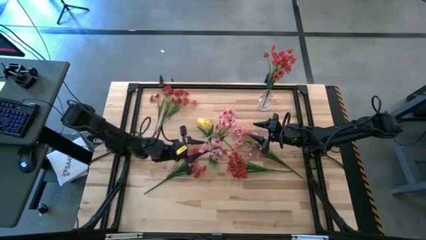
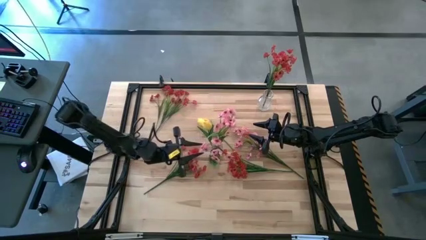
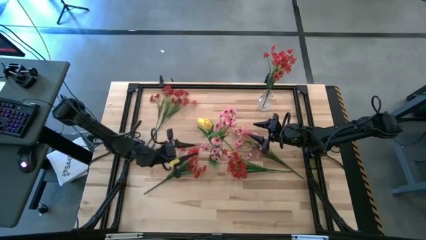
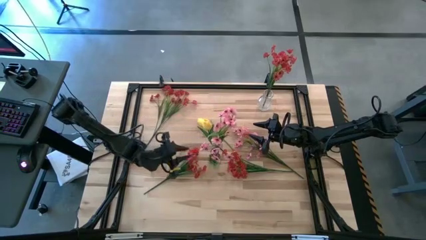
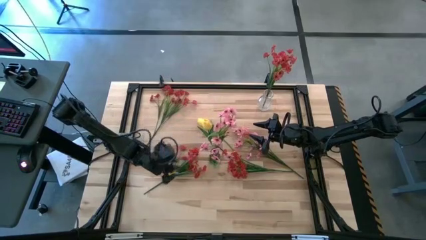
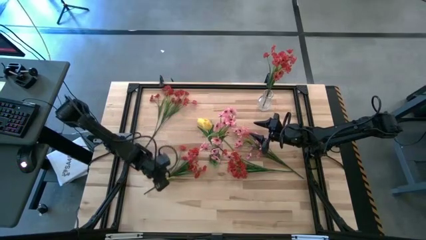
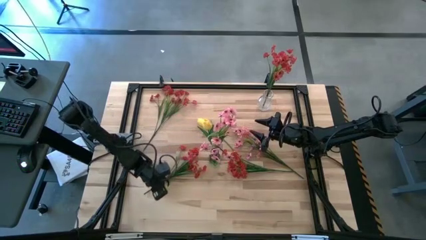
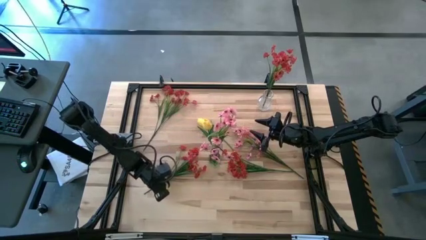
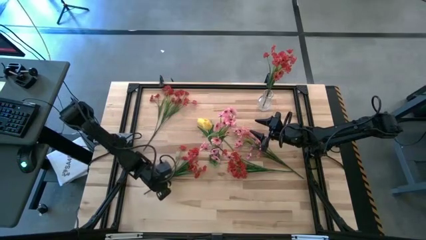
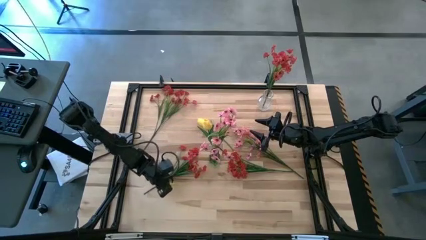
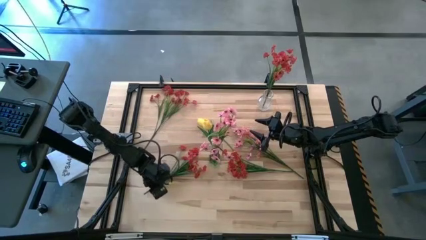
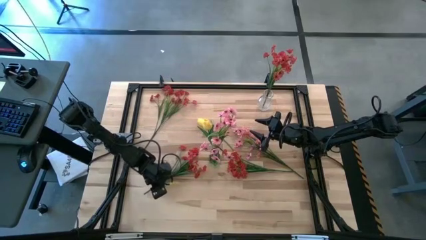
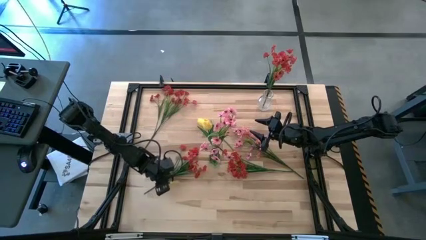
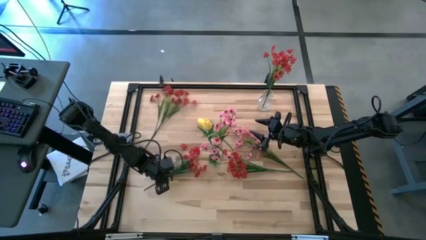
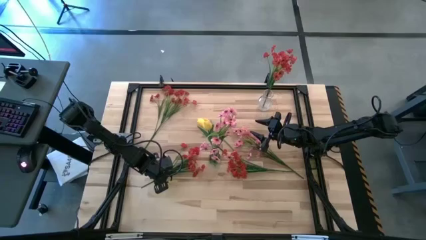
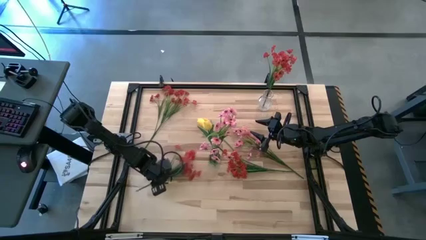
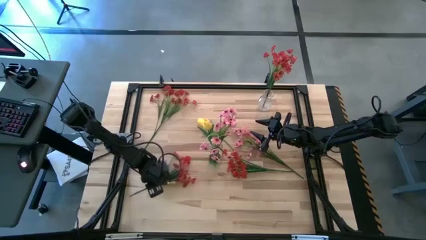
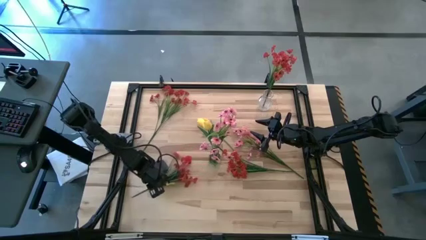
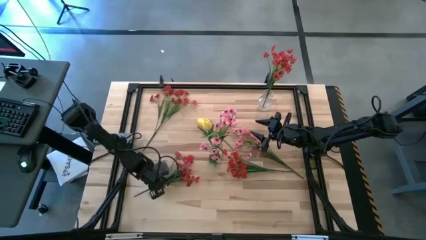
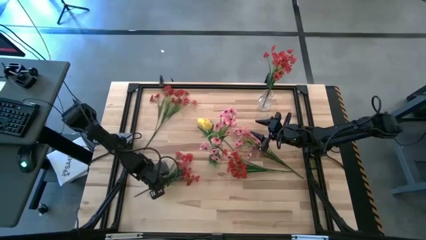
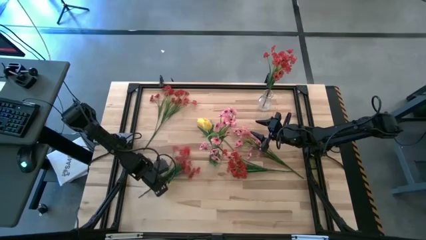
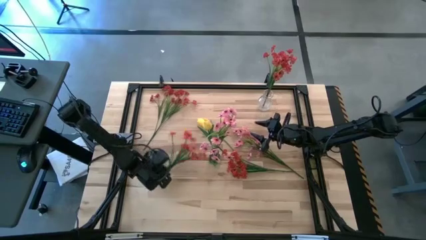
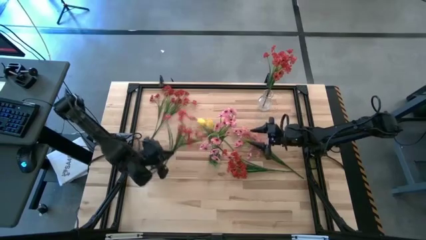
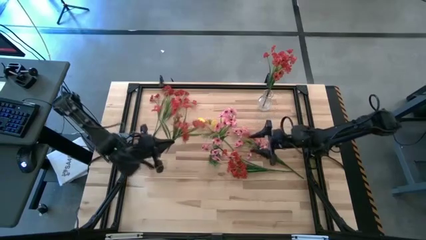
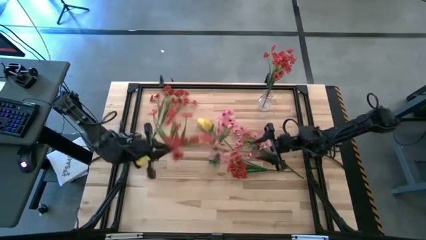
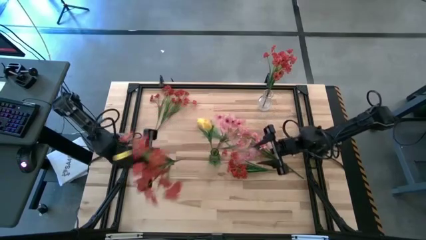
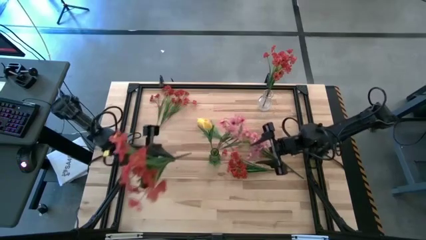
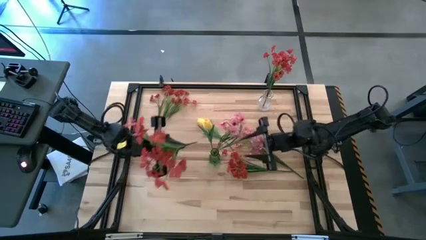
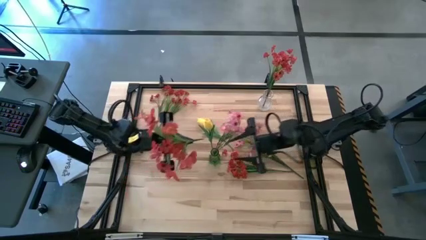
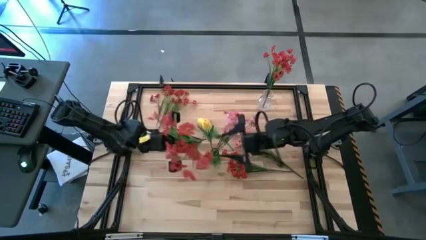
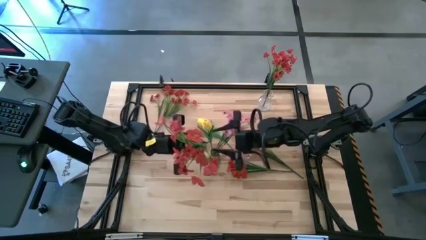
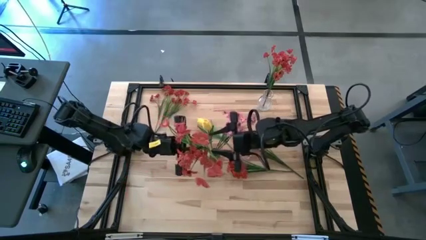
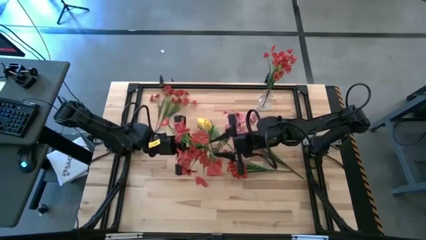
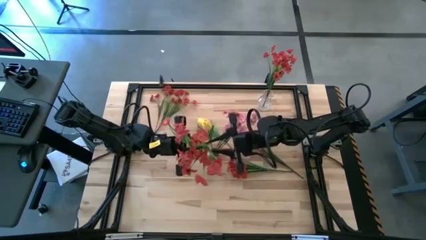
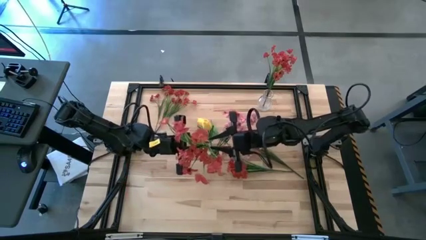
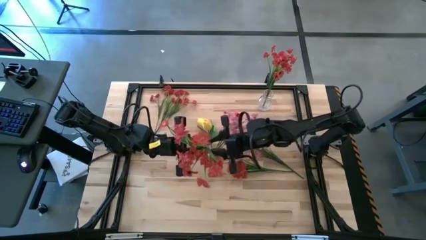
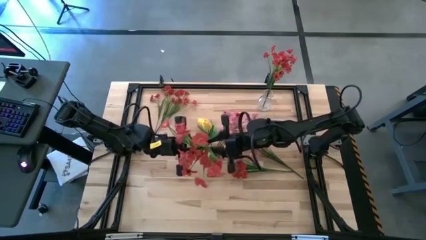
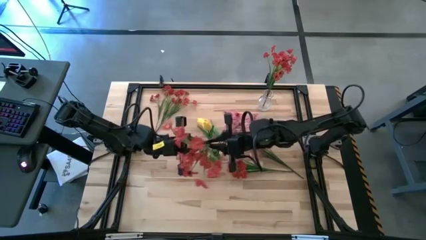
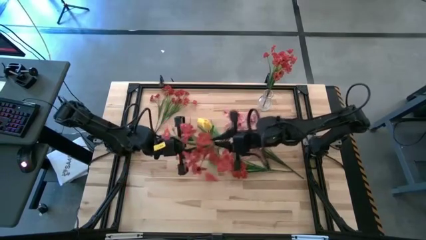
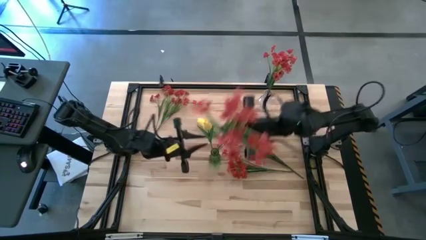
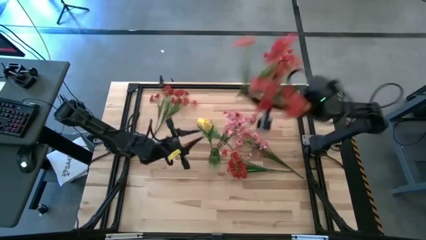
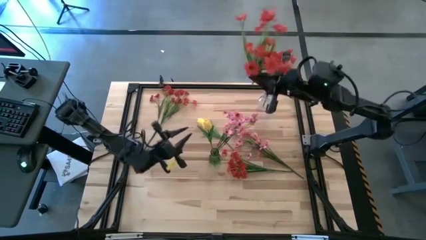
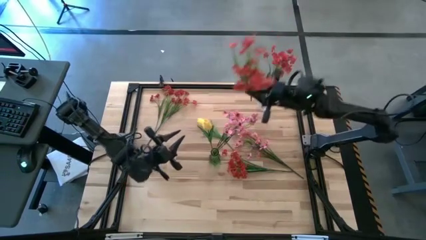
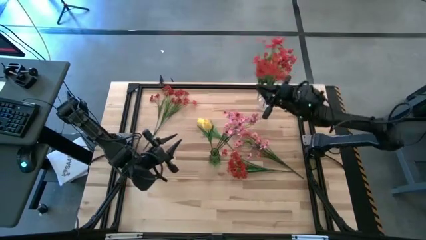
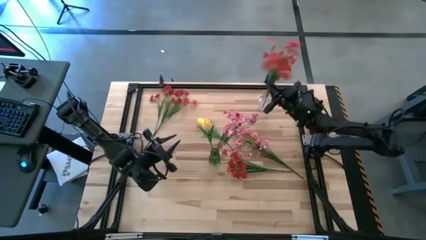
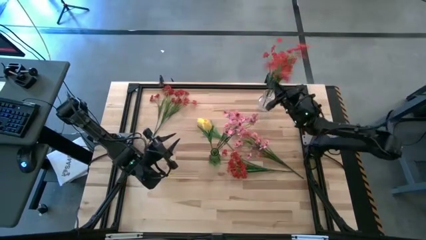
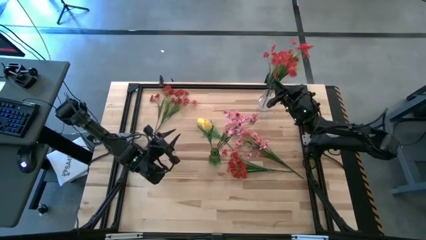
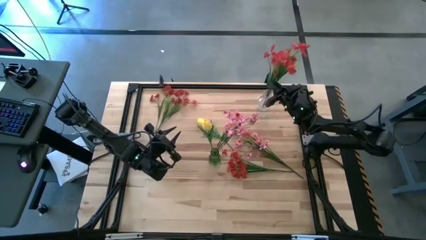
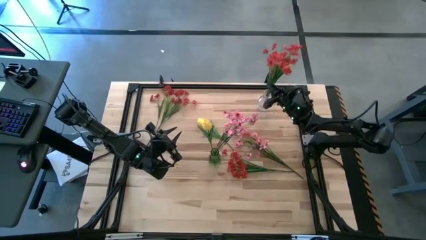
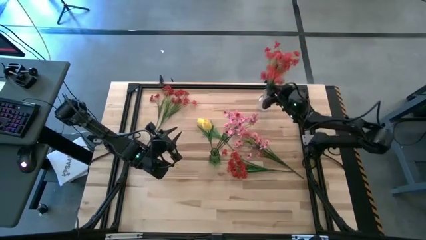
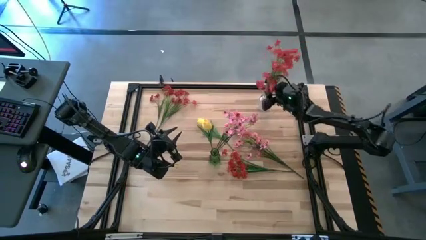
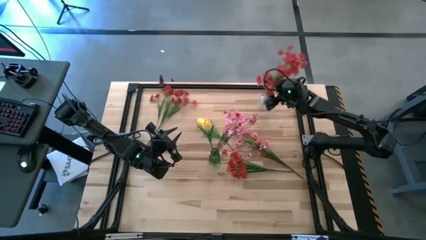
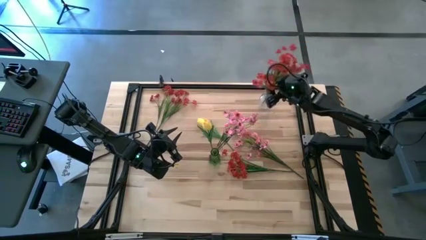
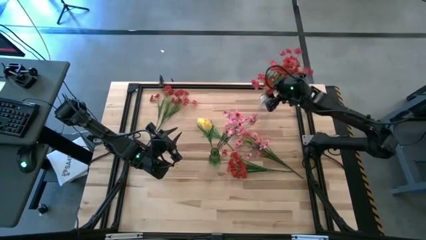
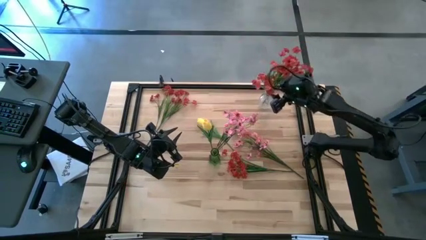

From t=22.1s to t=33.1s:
Task: Sort flowers into vase by color
Put the bottom left red flowers into the transparent vase

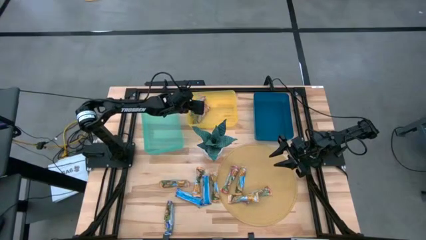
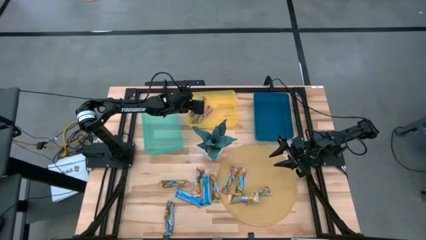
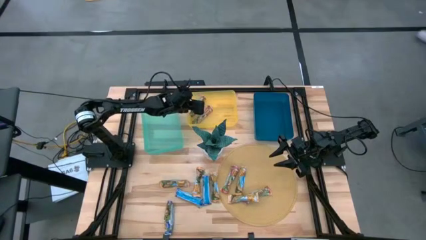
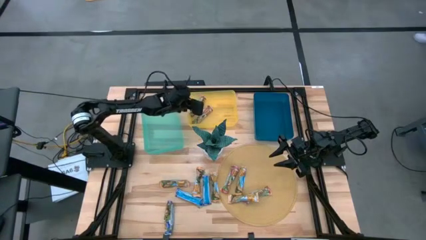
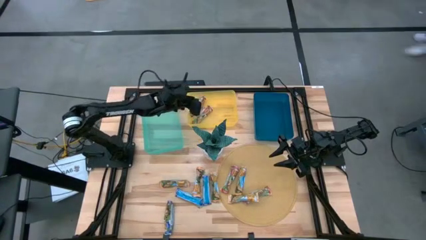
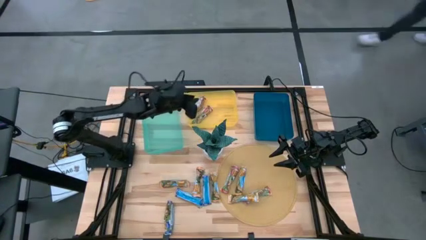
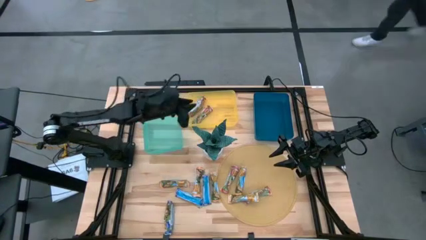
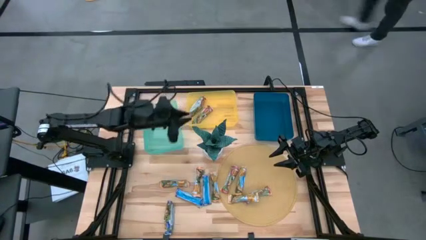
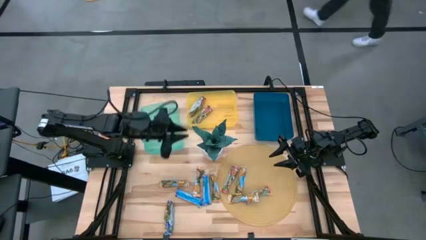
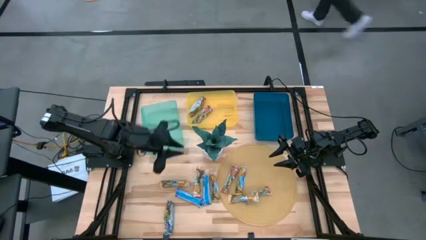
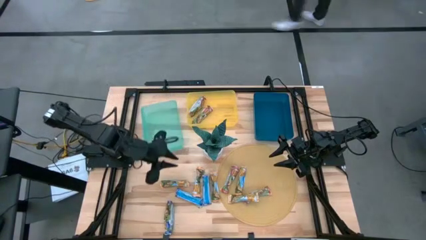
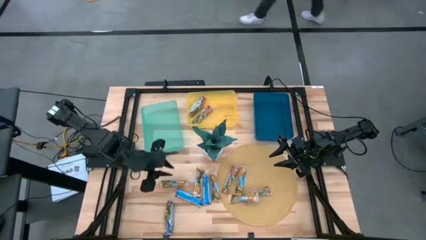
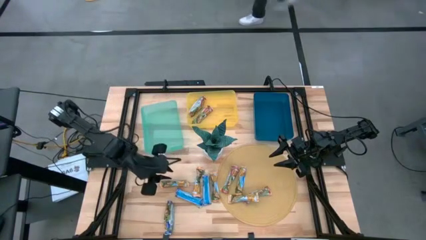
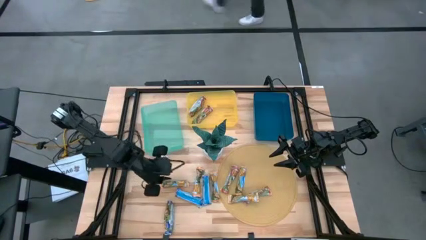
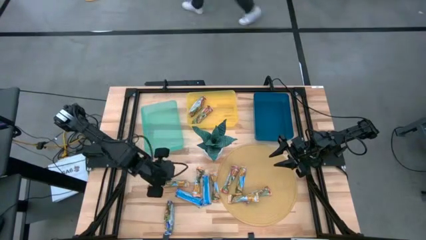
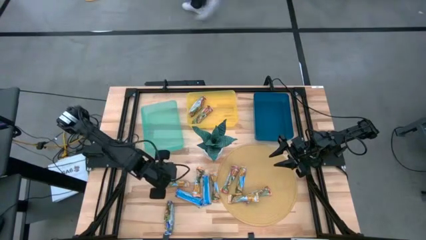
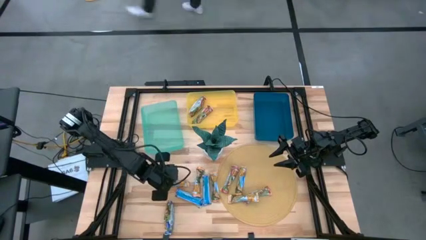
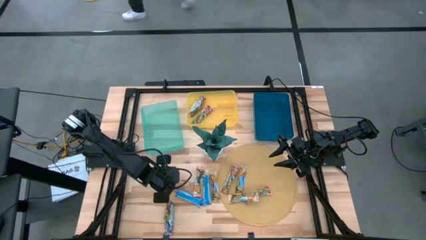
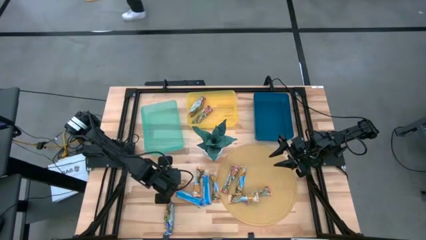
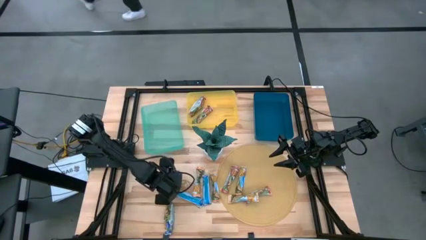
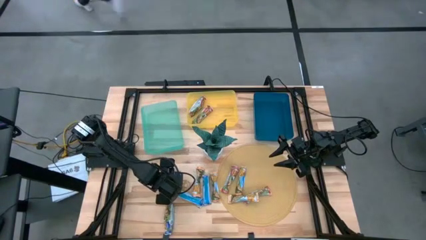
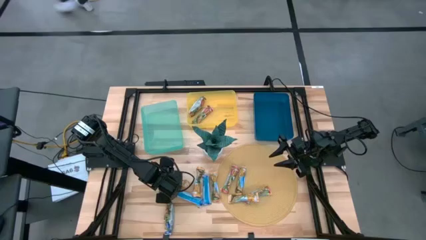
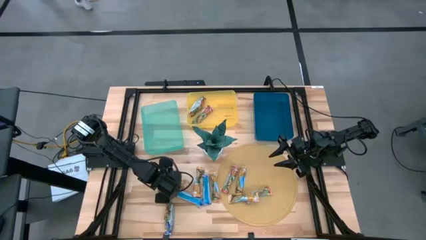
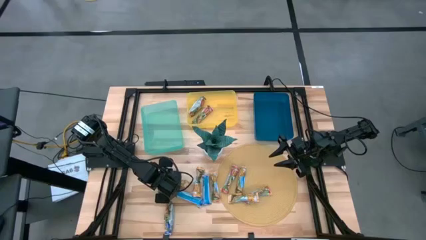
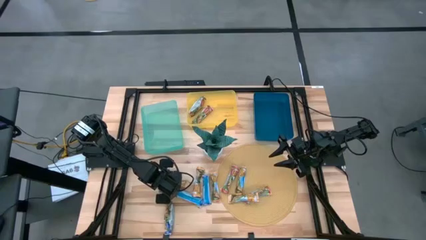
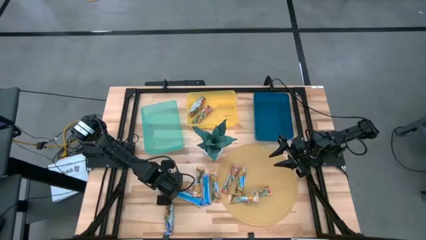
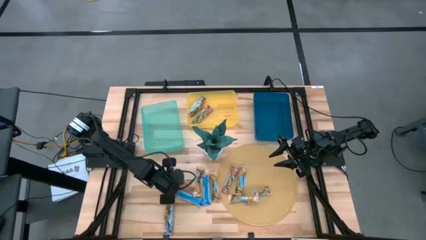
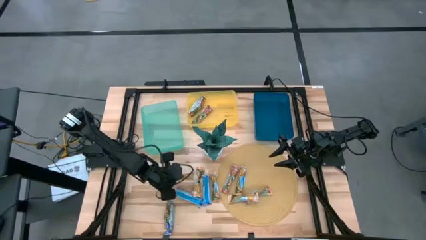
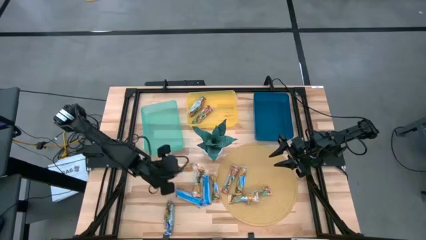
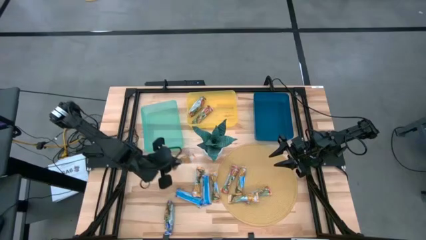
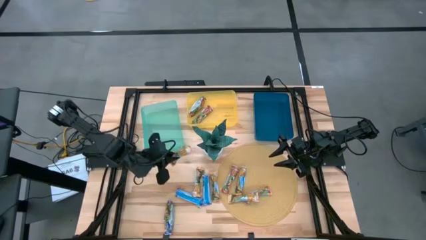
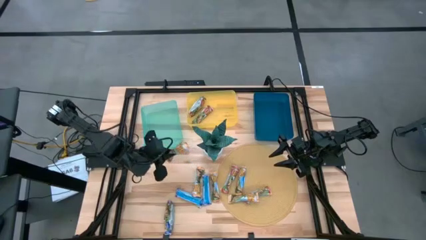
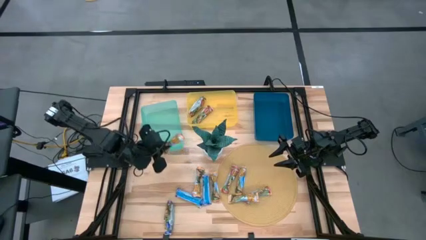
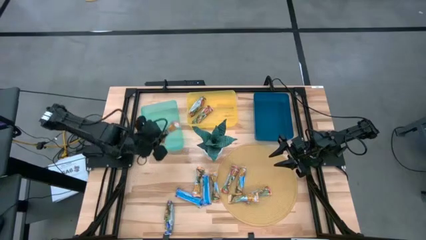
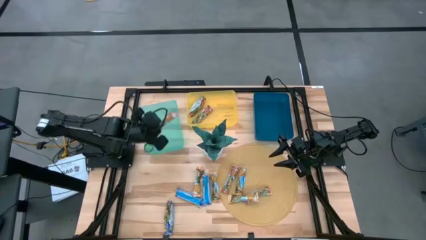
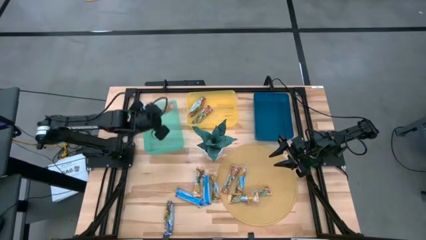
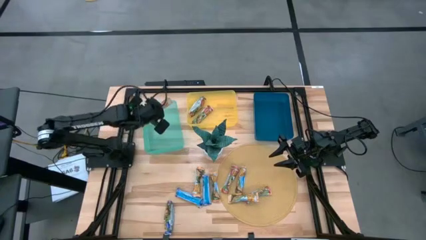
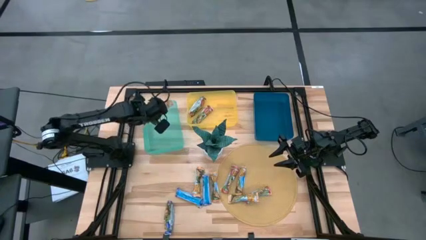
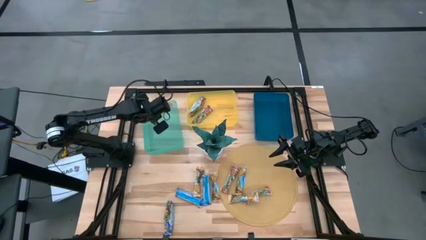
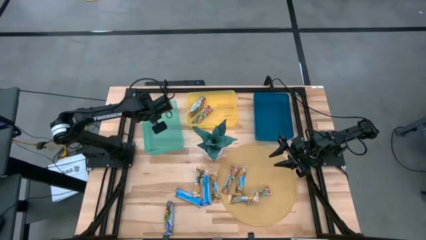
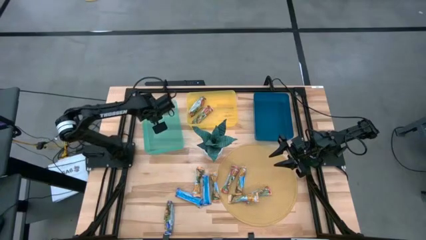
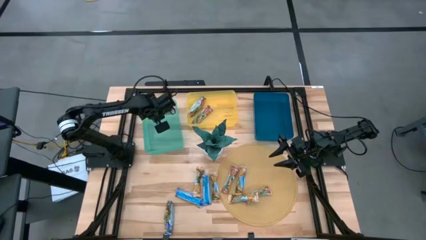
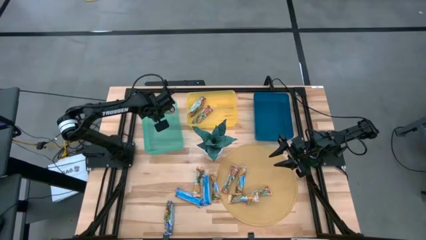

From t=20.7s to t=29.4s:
Task: Pick and place Granola Bars by type
Put the orange granola bar into the green bin
